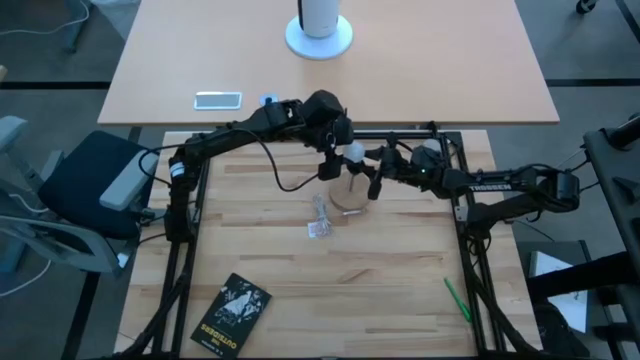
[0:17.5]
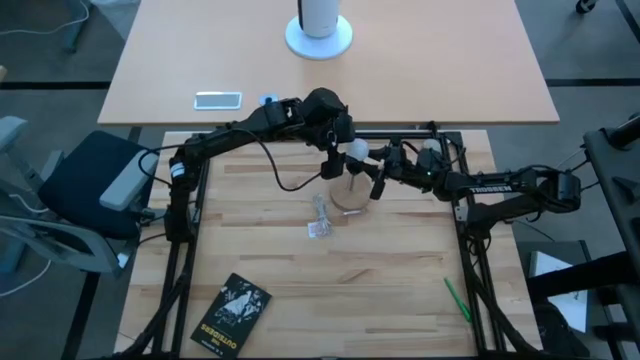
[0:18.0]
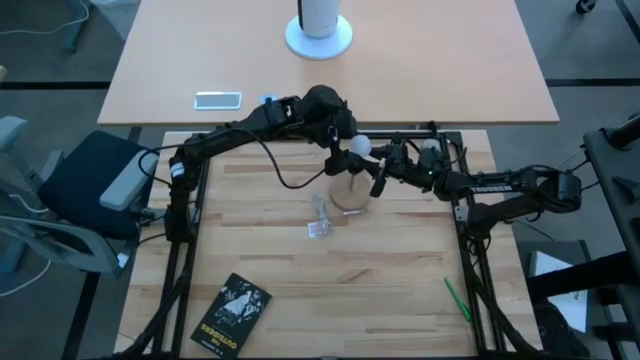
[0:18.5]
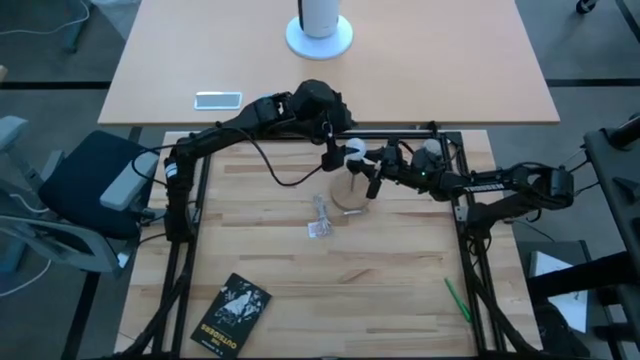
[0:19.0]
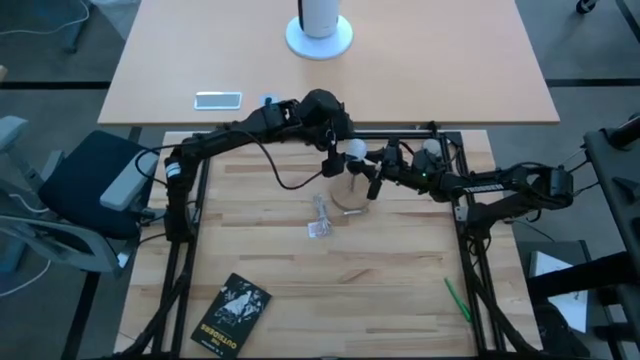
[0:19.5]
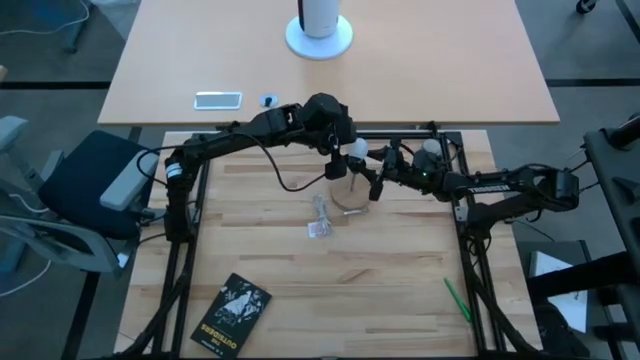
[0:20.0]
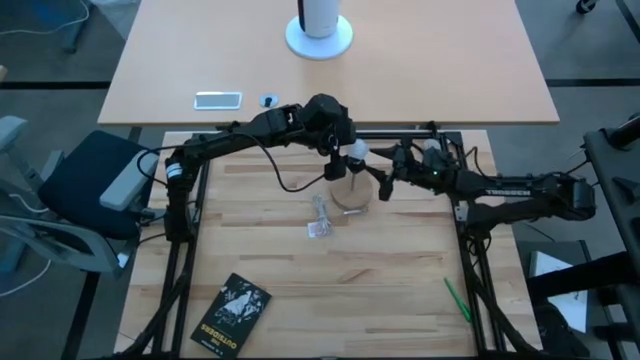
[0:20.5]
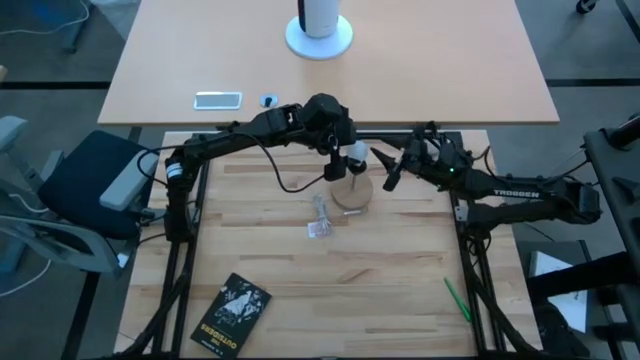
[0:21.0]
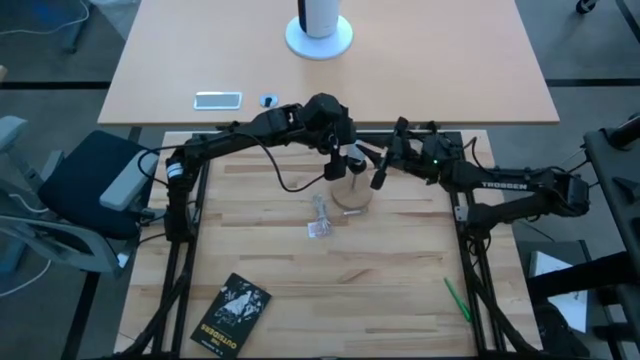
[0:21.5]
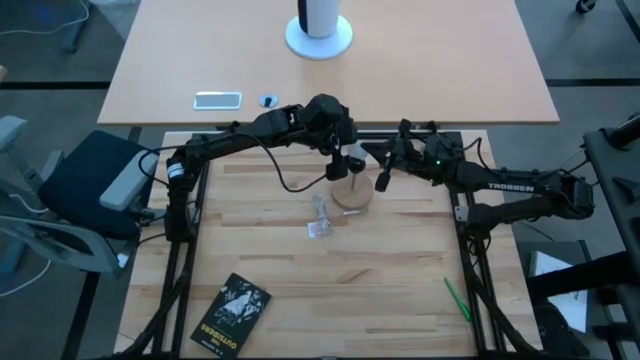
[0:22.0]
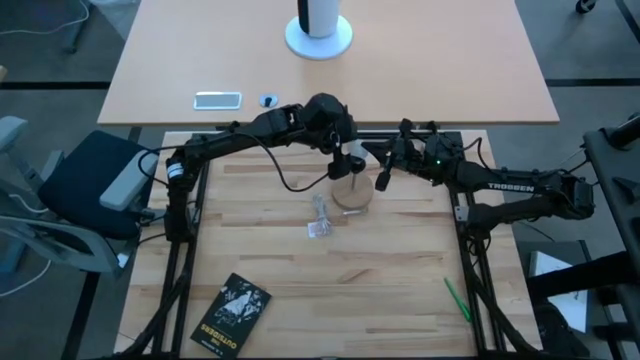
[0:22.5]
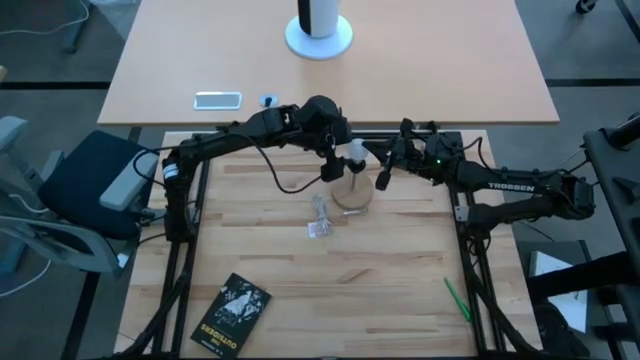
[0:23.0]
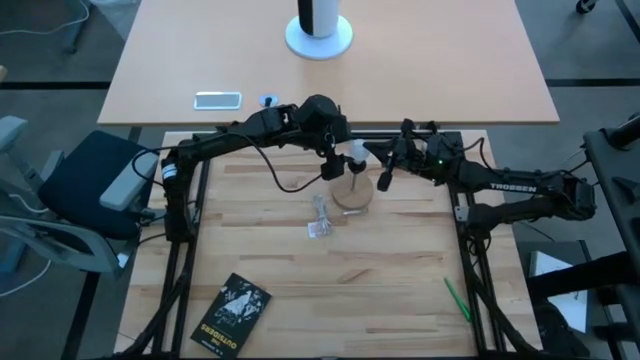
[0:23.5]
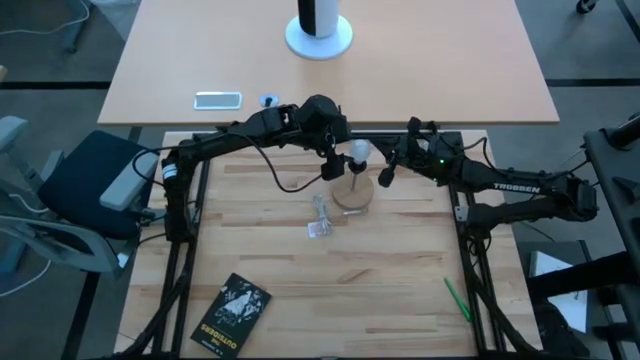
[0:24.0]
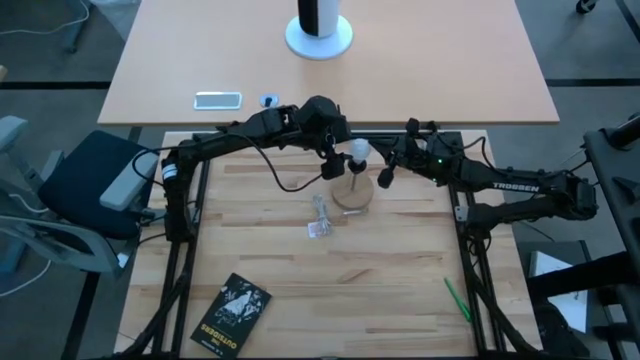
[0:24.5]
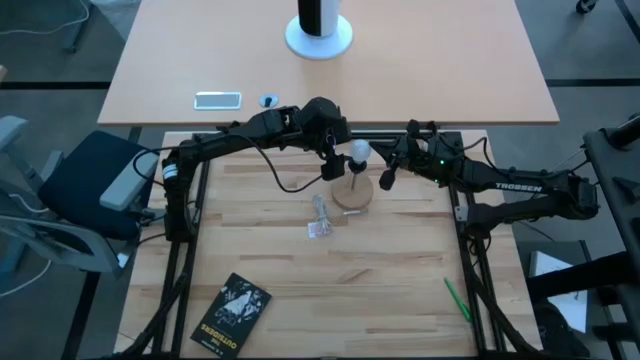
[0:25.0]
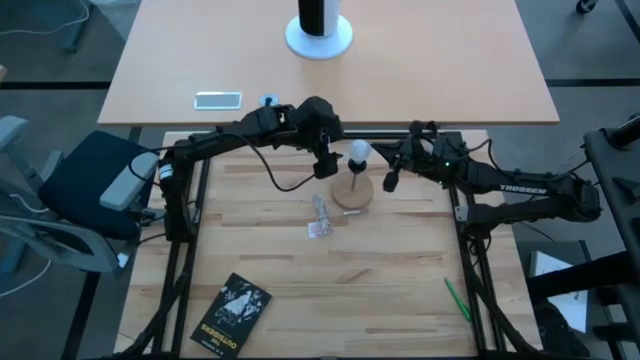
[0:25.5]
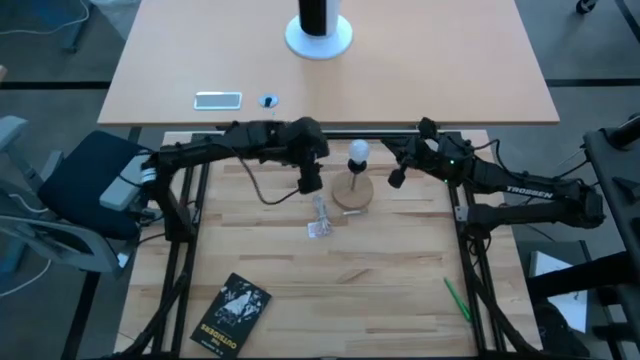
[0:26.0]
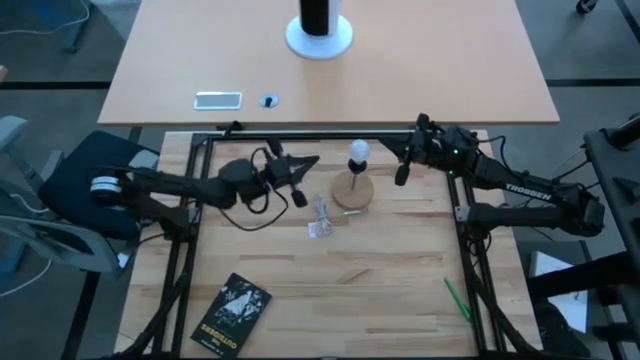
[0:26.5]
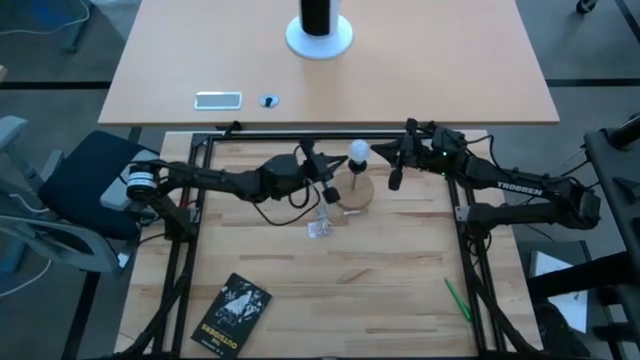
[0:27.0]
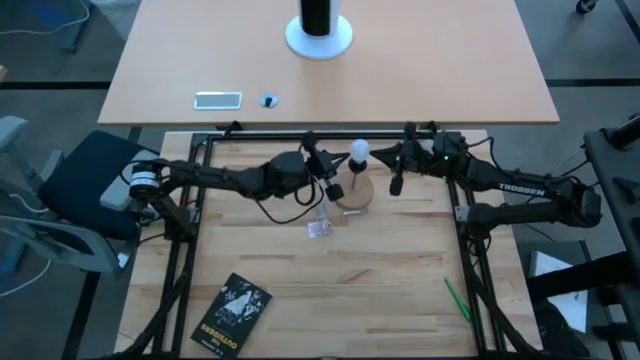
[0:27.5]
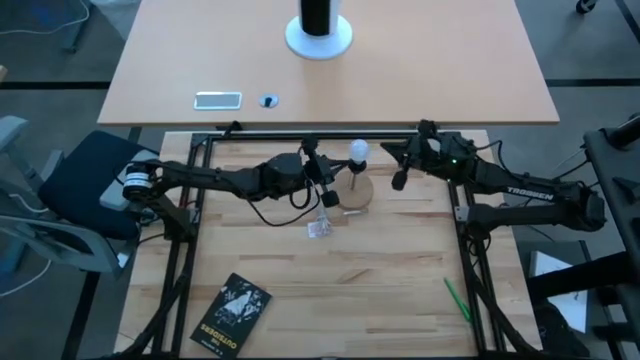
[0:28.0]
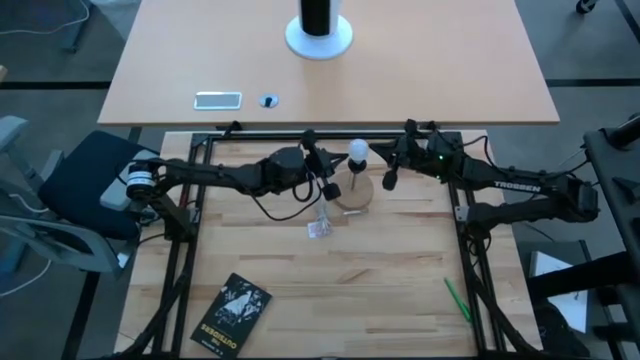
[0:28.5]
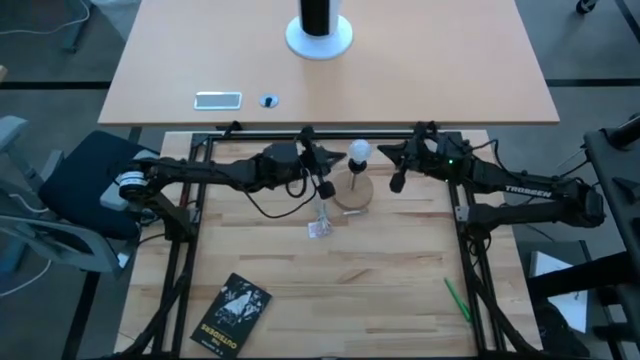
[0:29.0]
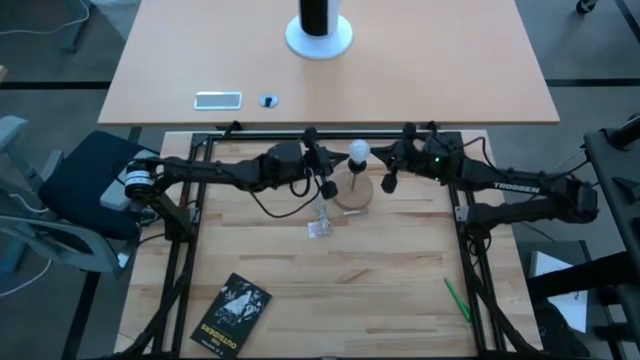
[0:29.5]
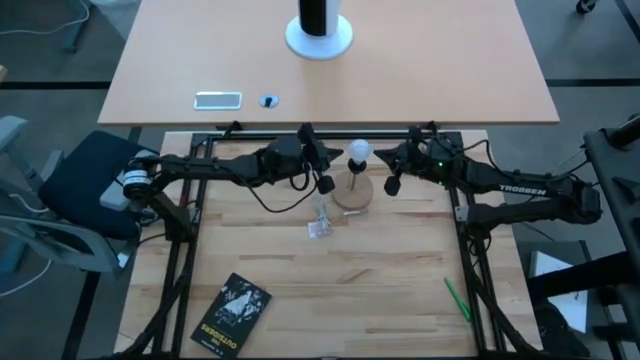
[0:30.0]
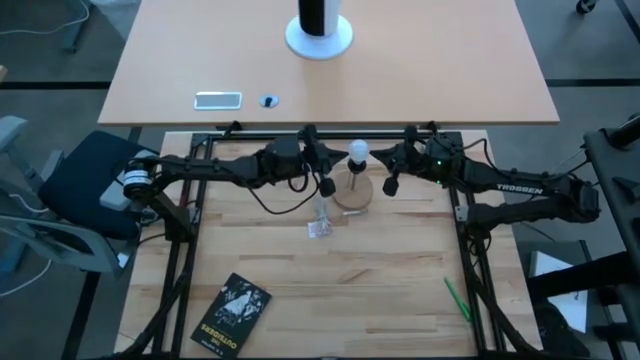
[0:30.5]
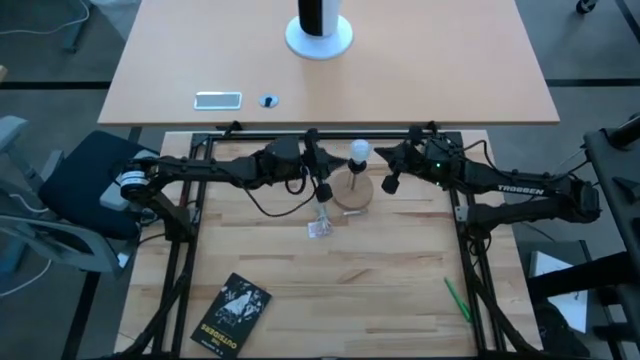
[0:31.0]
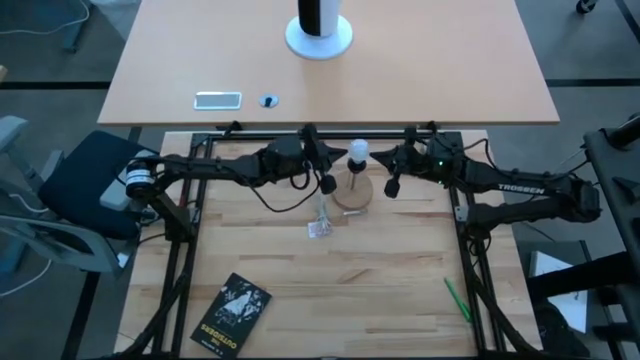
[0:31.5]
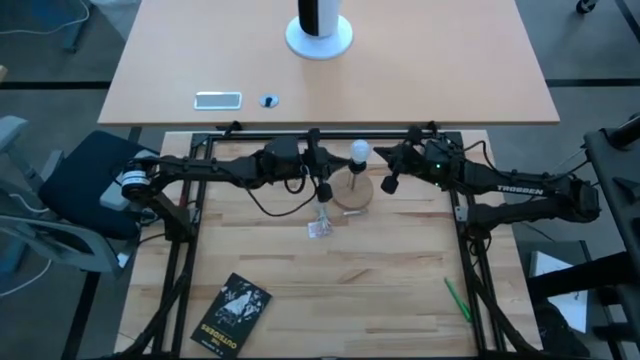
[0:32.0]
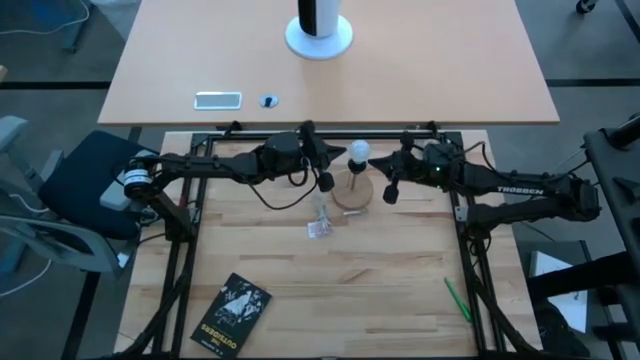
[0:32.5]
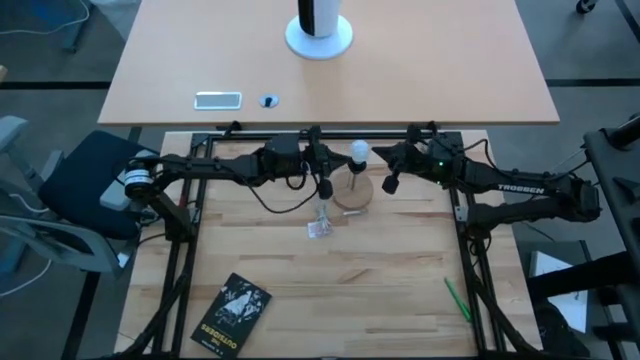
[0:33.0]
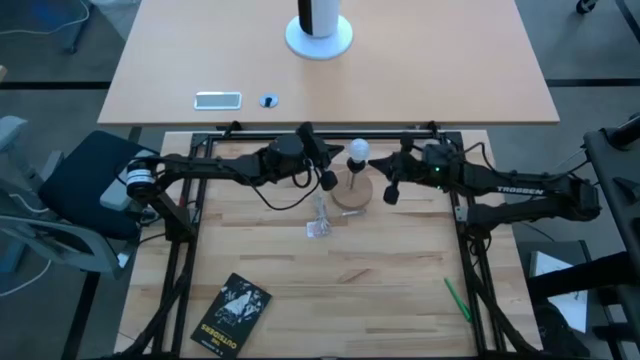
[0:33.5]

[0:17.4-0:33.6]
Task: Screw lightbulb
Insert the lightbulb into the lamp

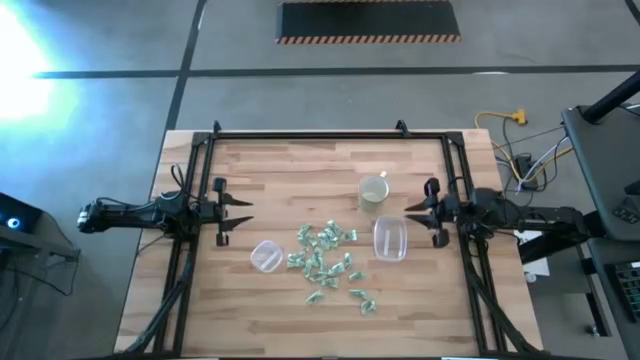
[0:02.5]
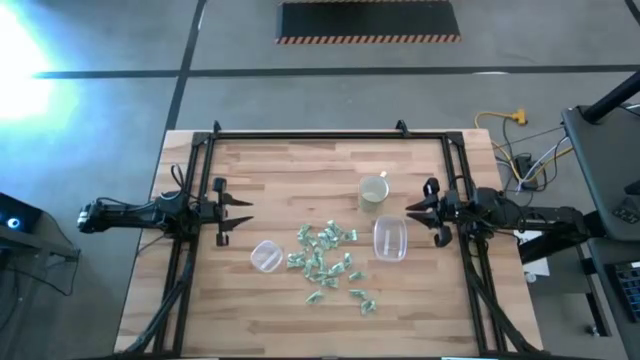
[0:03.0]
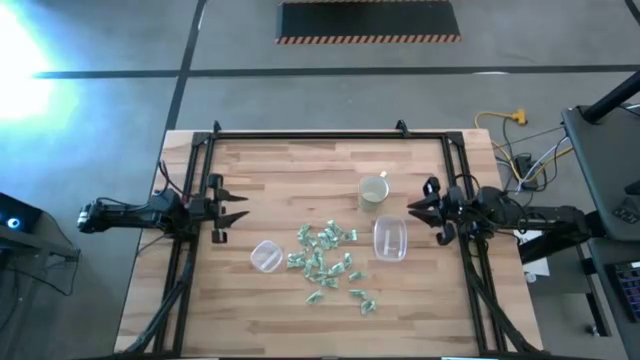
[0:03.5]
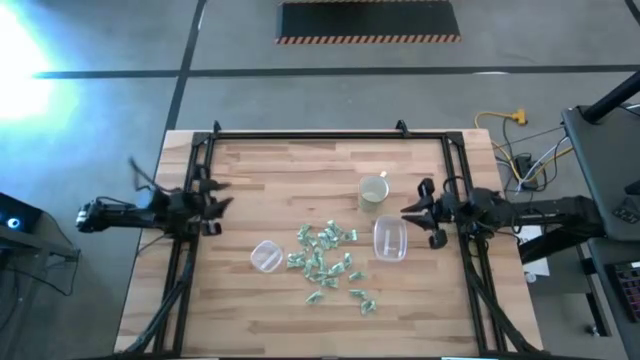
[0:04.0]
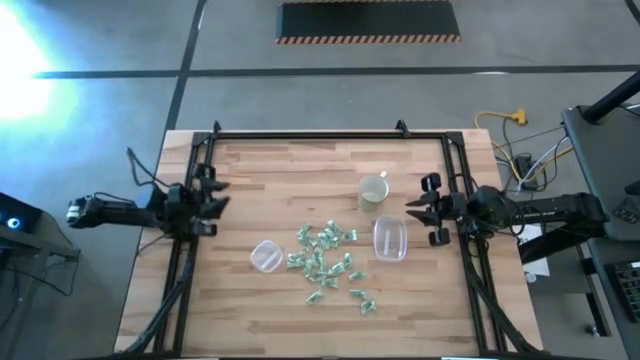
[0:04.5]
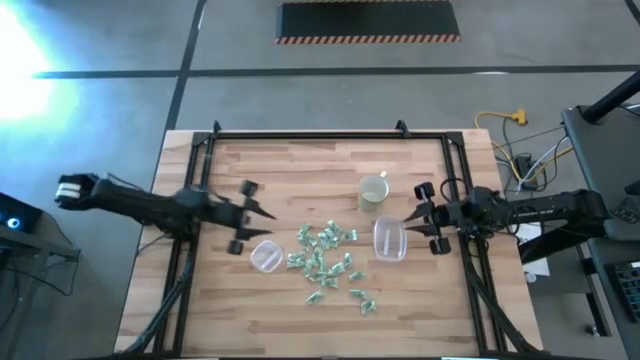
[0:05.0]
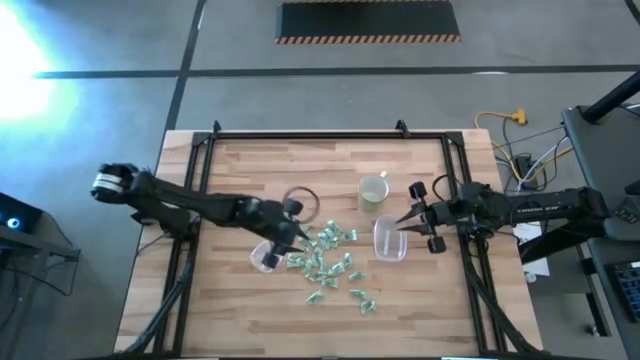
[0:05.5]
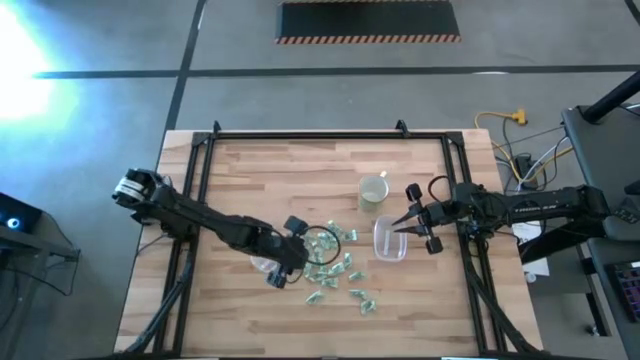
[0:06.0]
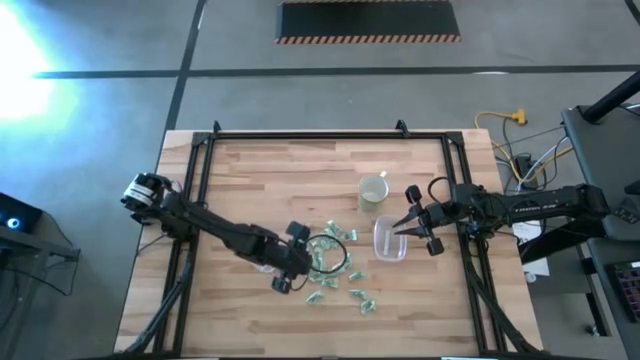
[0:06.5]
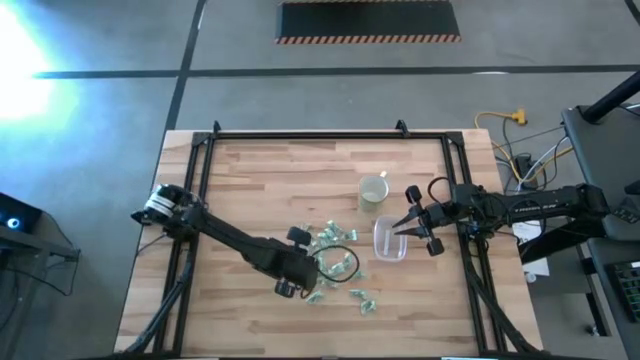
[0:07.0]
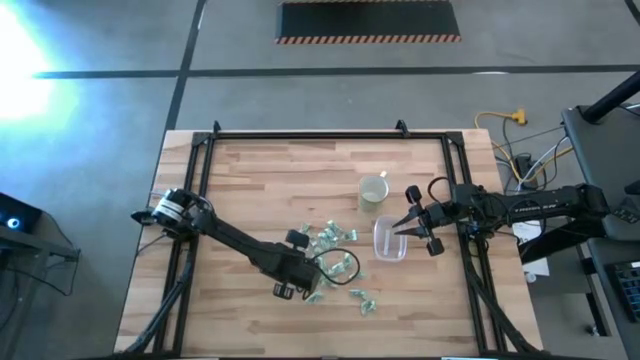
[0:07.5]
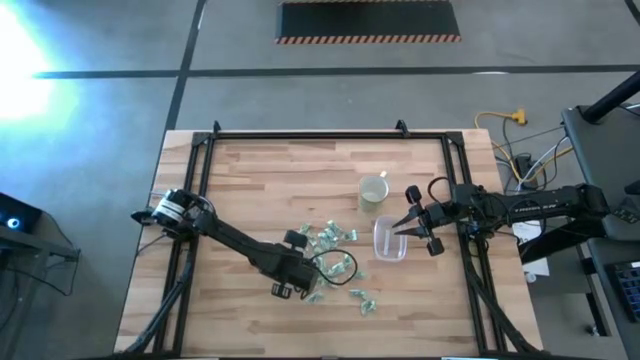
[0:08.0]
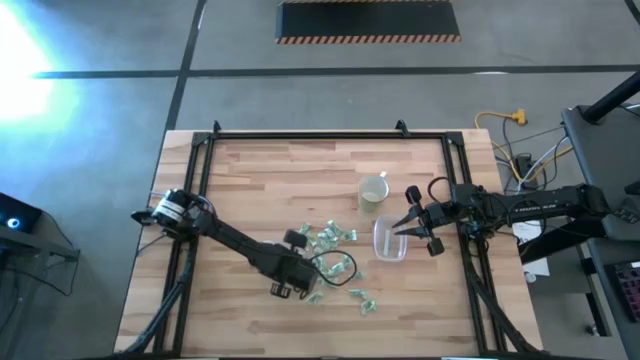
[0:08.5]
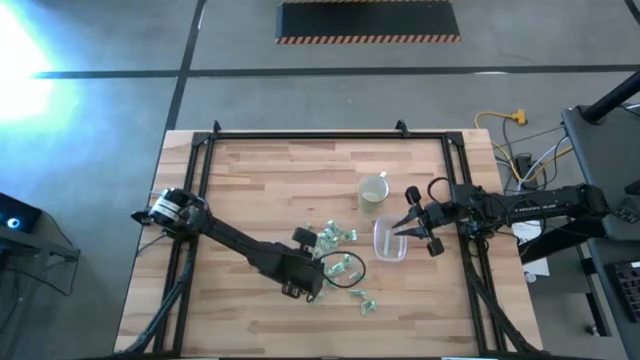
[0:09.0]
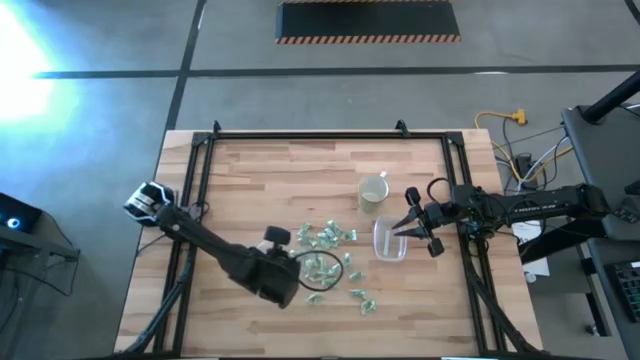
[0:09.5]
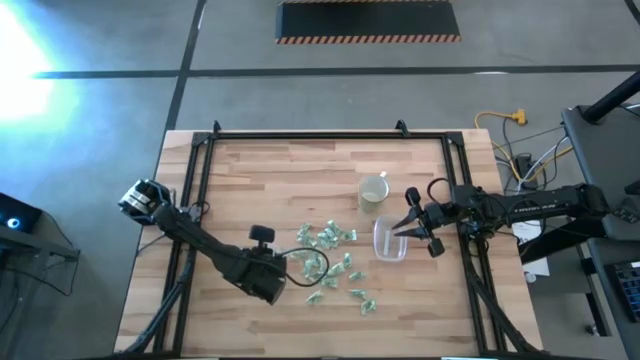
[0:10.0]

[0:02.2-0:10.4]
Task: Pick and place Stevia / Truvia into bins
Put the stevia packet into the left transparent container
